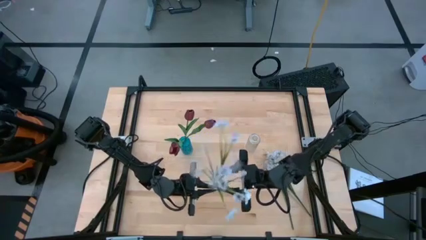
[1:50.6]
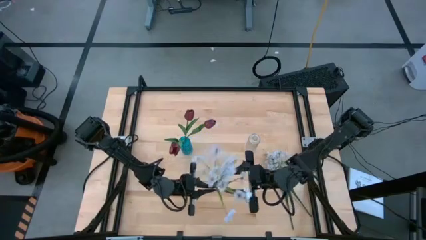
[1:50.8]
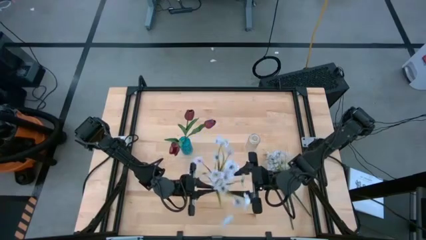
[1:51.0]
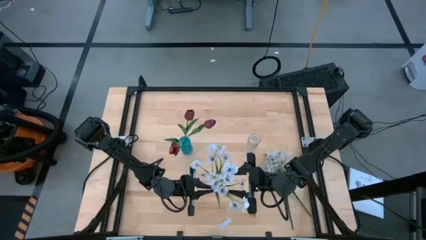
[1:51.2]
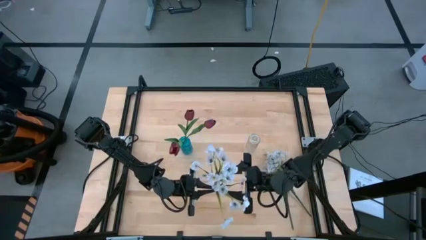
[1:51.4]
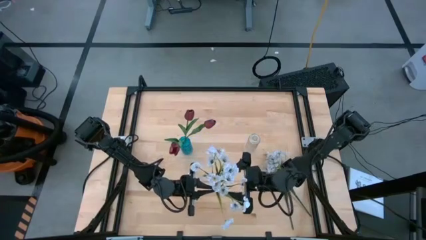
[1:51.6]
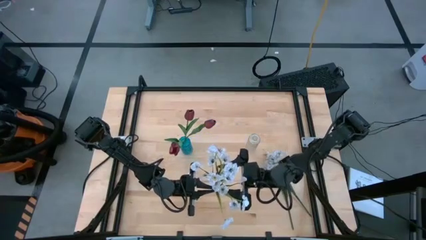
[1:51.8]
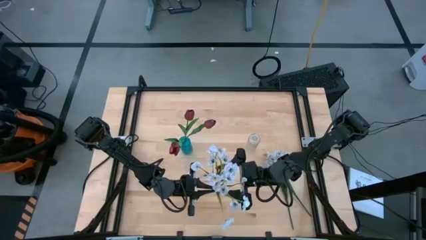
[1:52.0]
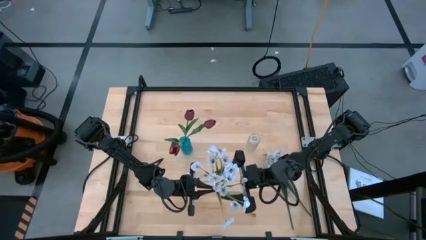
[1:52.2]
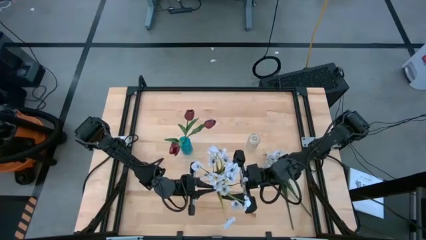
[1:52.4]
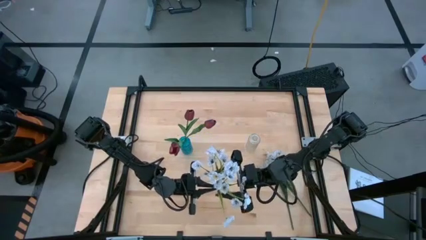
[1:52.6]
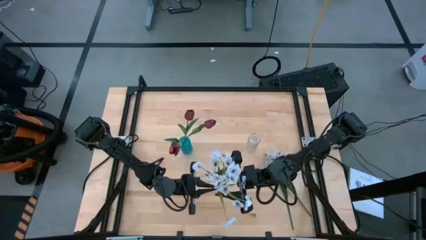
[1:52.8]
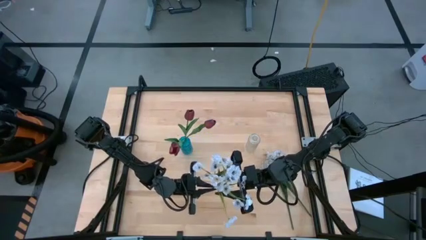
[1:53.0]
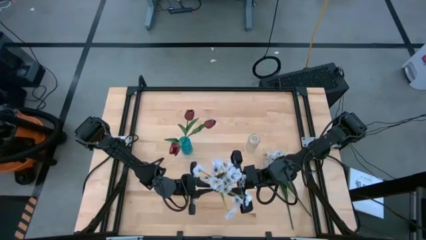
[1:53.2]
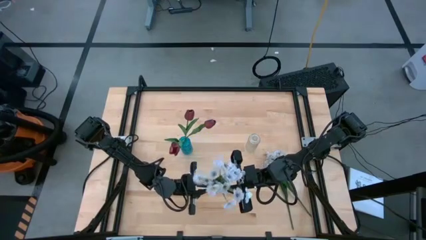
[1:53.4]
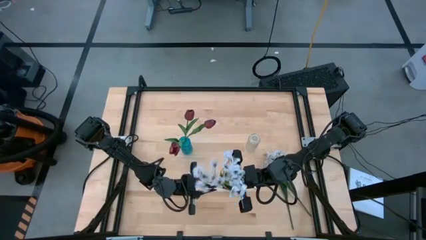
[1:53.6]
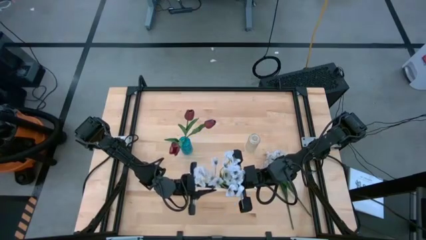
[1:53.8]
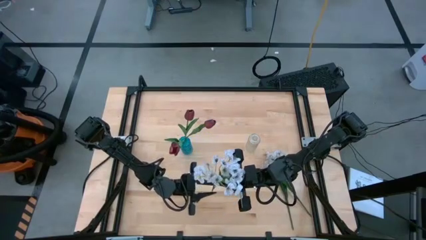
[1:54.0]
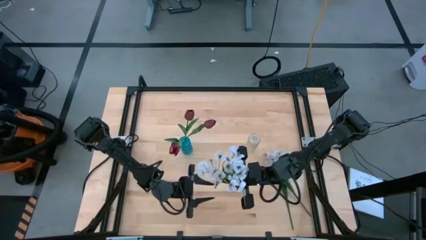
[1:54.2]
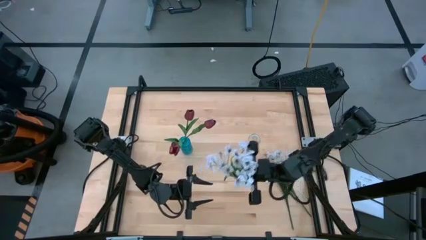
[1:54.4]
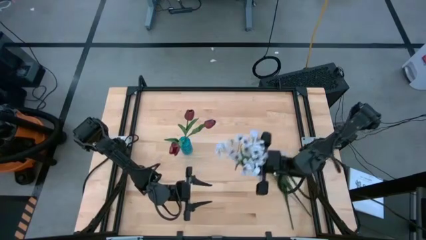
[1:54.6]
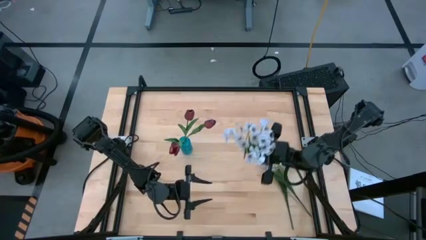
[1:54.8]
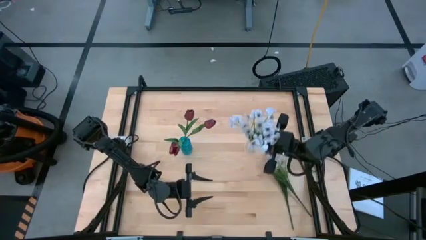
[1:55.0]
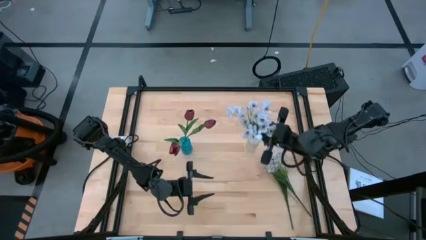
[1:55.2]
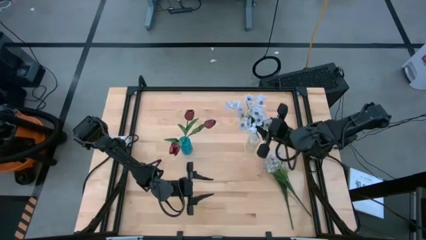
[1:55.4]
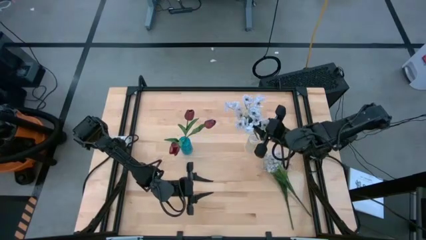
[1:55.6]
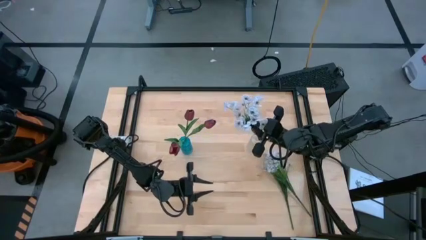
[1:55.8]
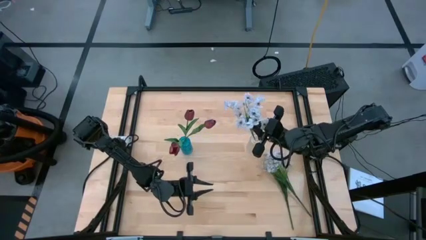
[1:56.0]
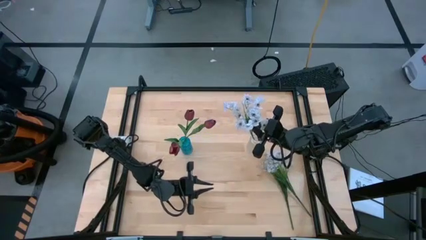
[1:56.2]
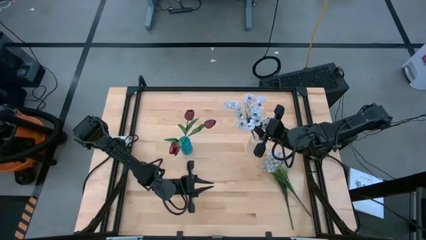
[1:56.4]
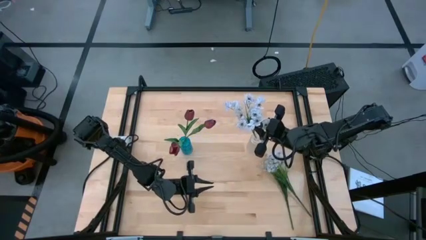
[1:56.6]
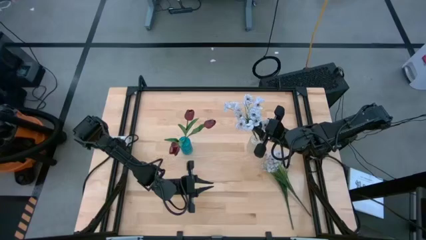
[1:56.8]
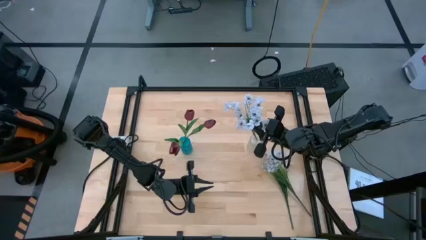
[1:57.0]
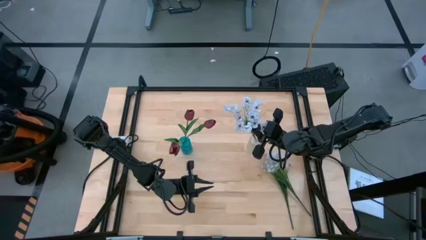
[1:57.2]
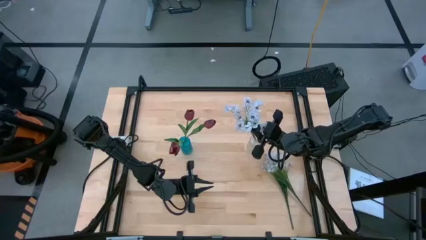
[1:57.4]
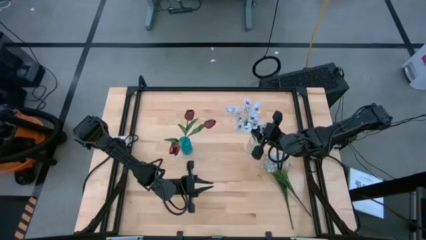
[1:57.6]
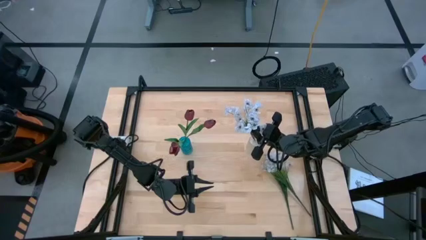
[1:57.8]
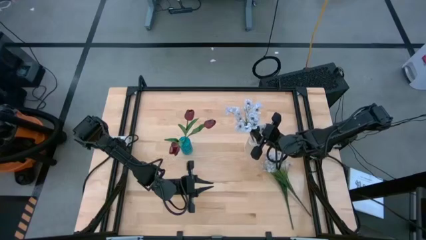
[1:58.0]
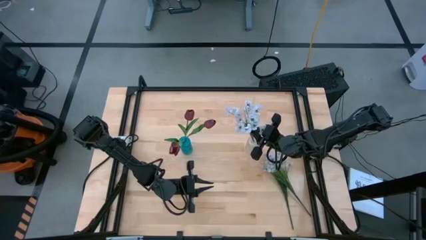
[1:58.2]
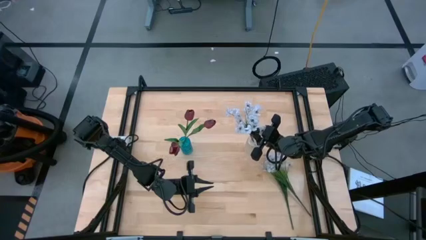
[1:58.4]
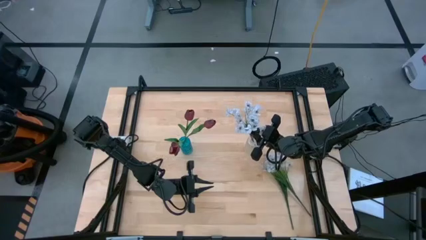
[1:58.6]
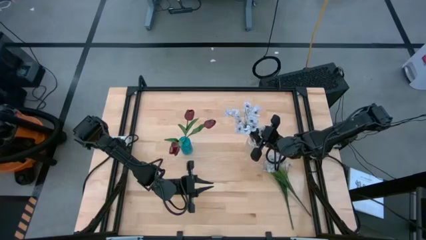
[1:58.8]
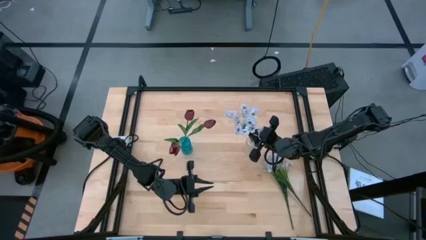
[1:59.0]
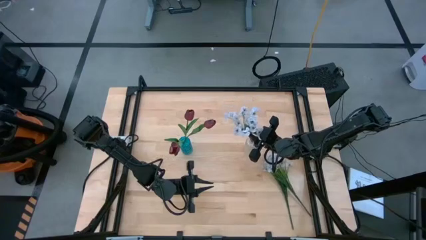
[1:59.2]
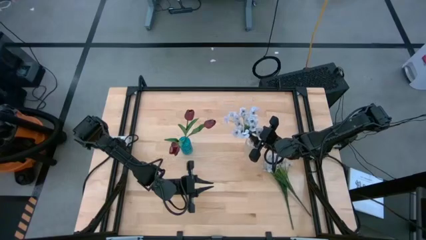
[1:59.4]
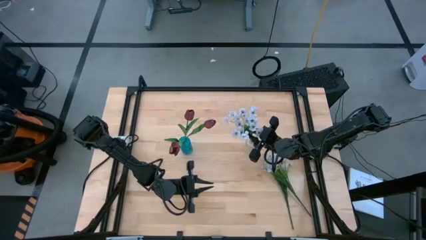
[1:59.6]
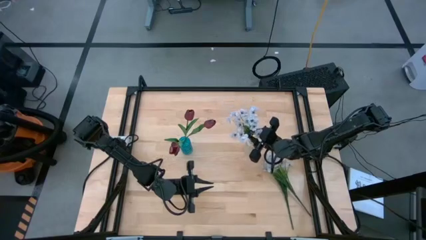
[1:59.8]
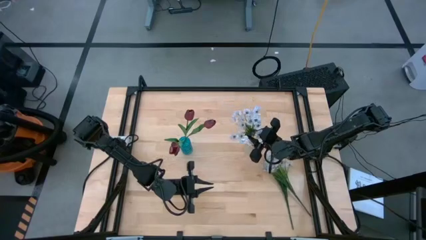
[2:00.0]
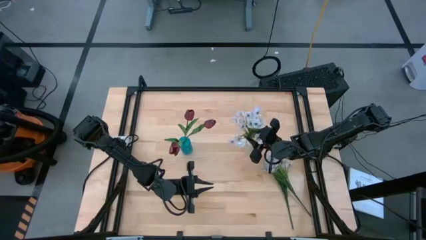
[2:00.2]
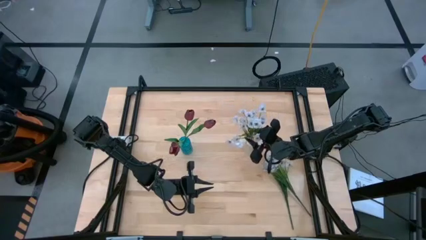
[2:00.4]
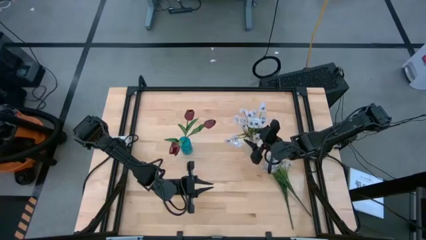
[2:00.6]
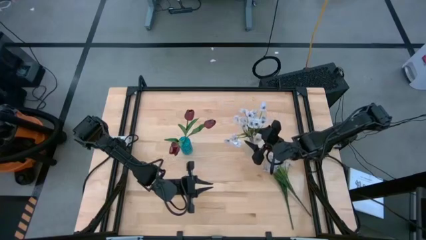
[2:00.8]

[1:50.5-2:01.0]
Task: Sort flowers into vase by color
Put the left daisies into the transparent vase

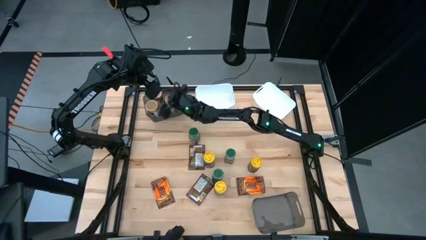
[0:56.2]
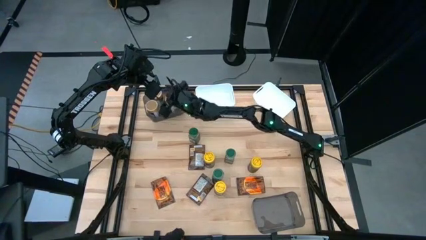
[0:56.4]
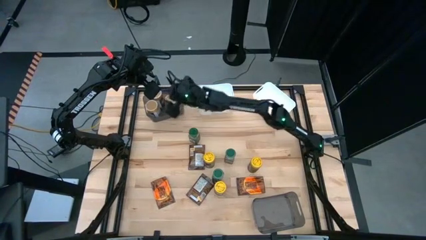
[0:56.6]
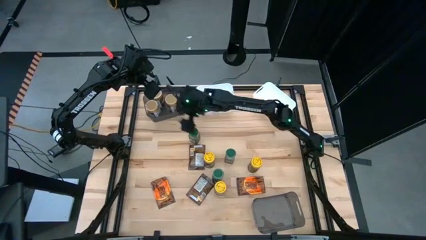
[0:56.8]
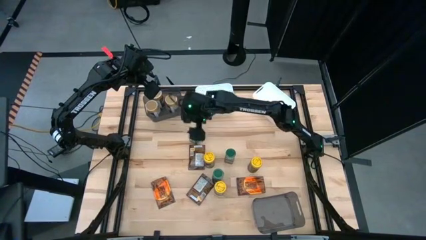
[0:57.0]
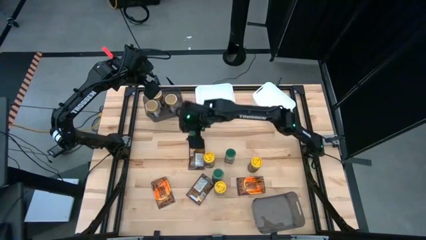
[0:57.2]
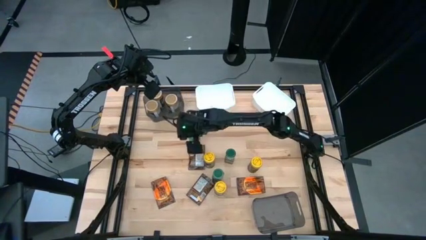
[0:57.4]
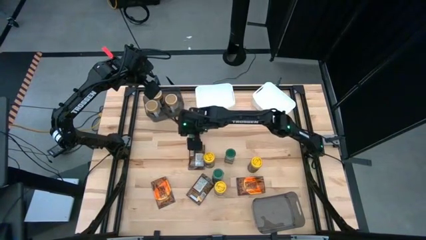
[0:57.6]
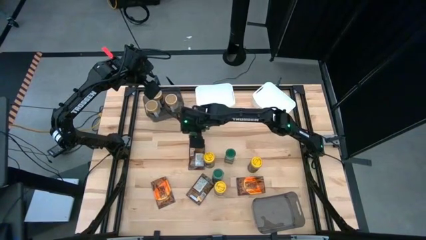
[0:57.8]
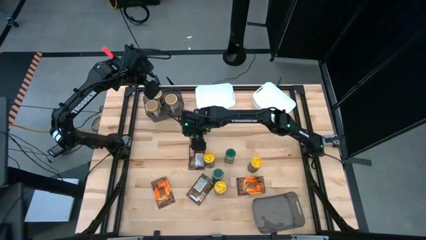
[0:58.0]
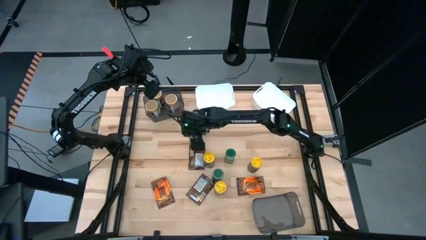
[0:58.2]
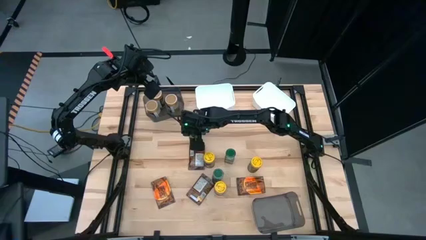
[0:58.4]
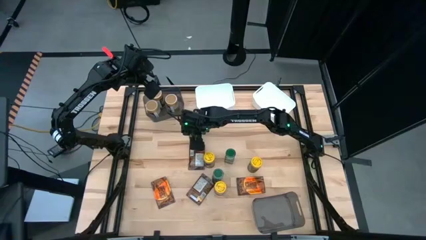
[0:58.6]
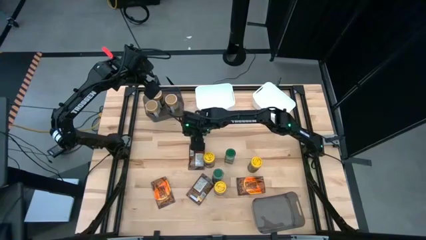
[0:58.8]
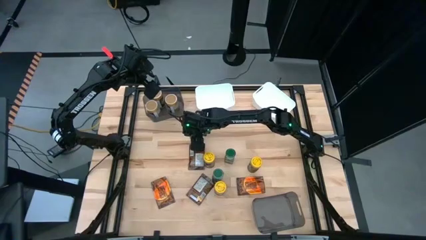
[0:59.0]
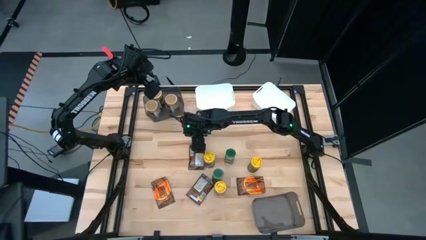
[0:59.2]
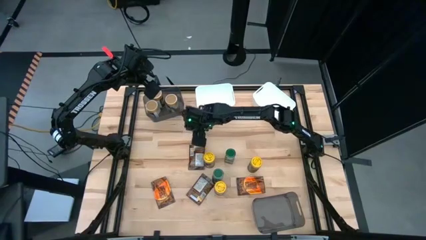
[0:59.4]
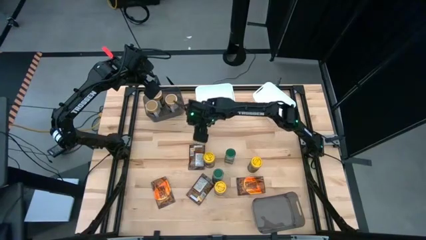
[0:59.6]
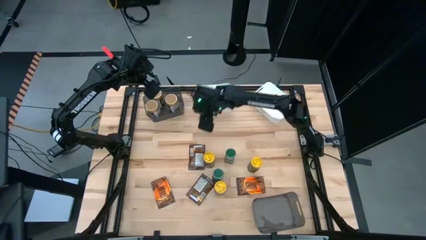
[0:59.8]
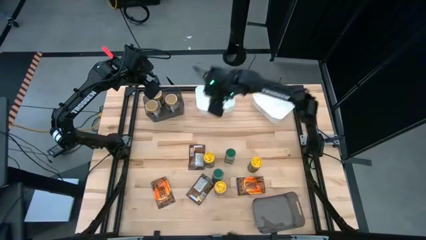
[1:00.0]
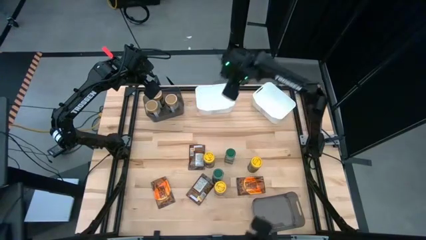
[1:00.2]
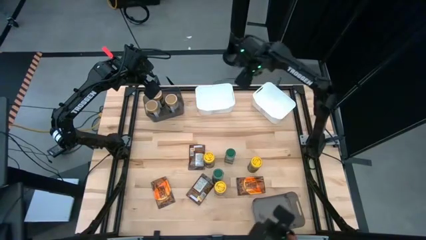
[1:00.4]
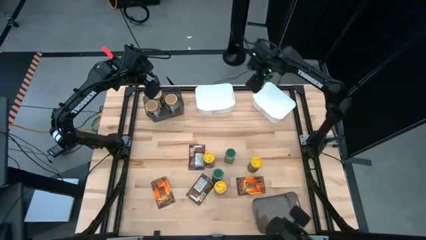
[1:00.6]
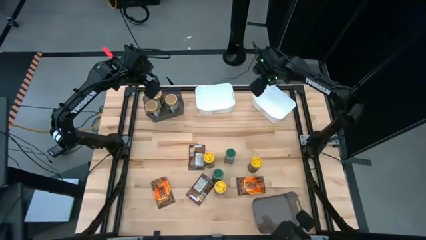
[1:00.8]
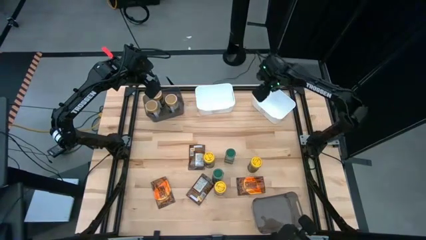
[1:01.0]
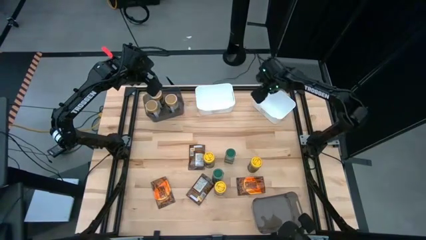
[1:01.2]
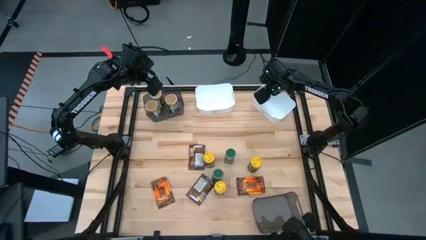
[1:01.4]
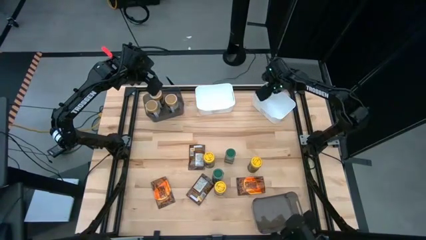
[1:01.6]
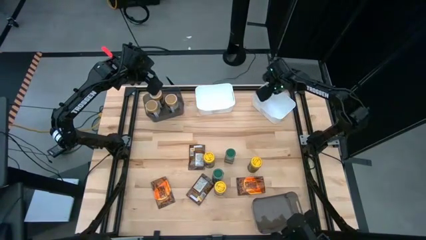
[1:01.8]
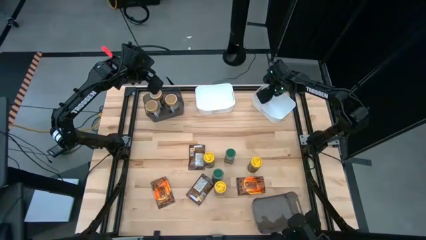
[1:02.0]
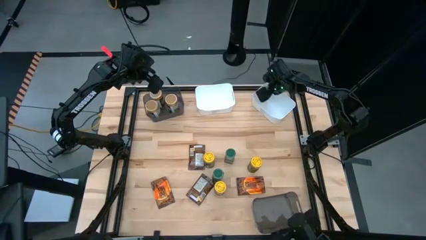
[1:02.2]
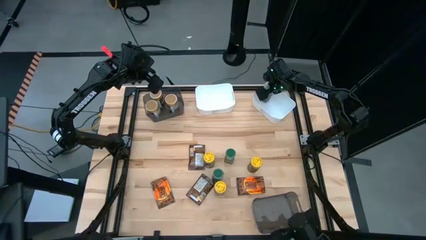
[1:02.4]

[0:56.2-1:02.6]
Task: Sort spices by type
Put the green seasoning bottle into the right white bin
